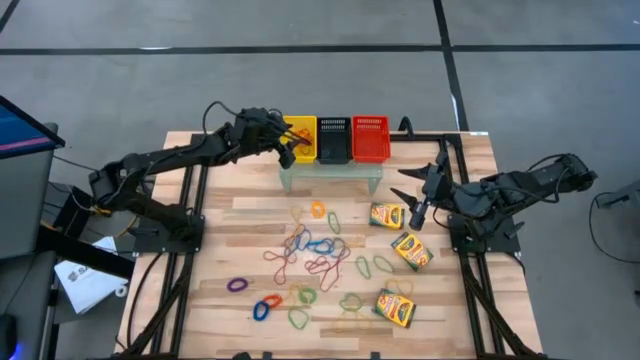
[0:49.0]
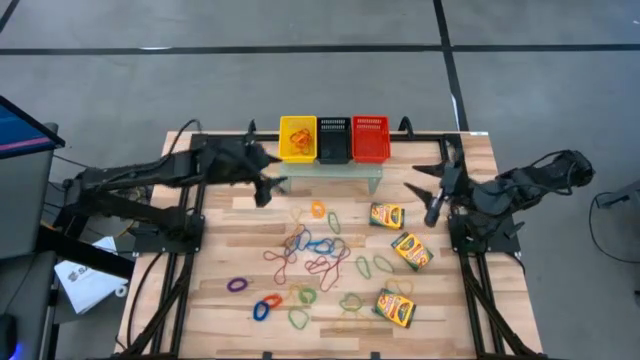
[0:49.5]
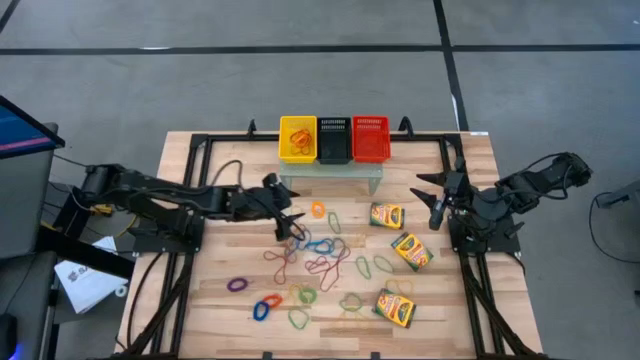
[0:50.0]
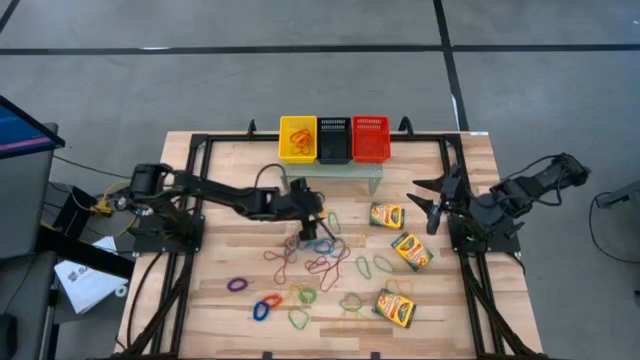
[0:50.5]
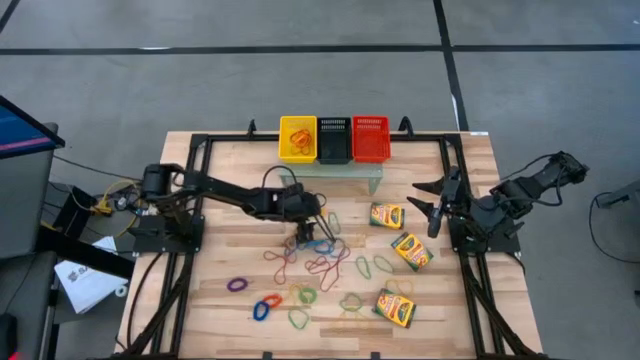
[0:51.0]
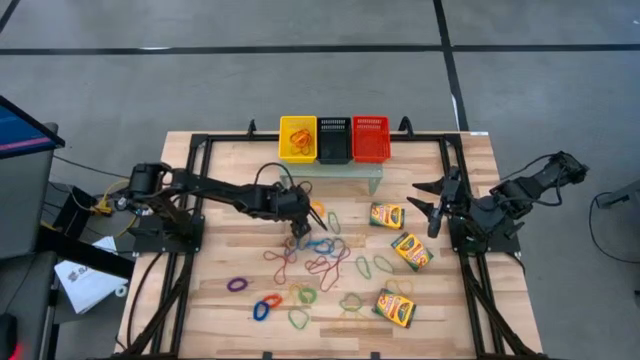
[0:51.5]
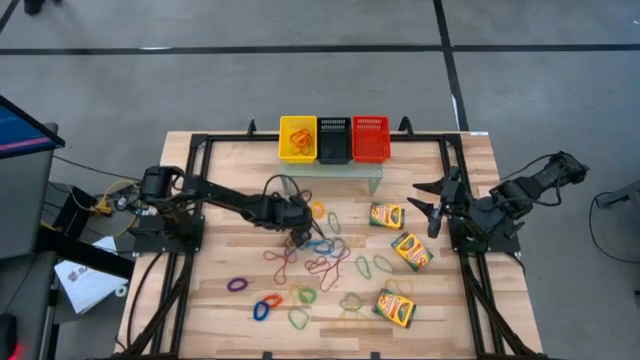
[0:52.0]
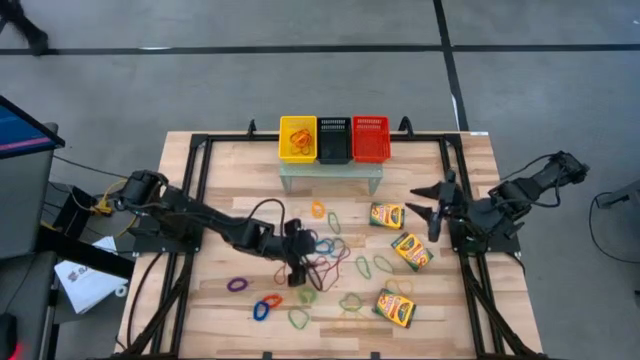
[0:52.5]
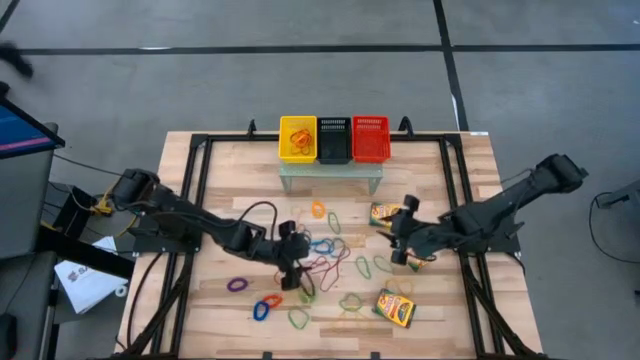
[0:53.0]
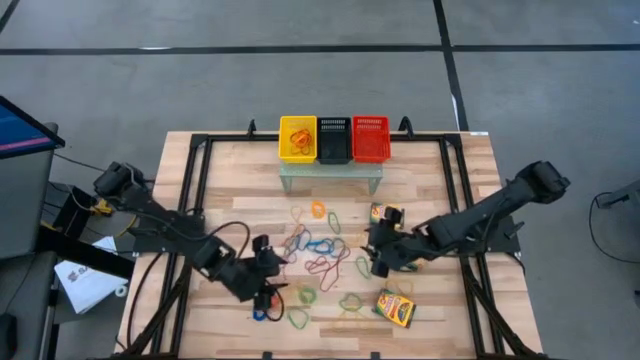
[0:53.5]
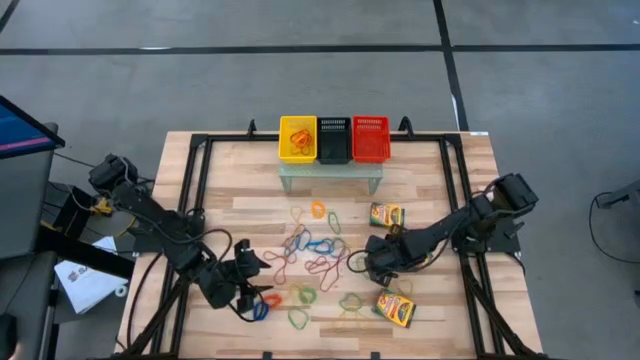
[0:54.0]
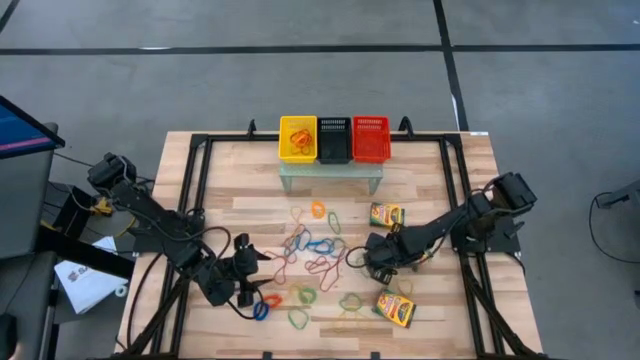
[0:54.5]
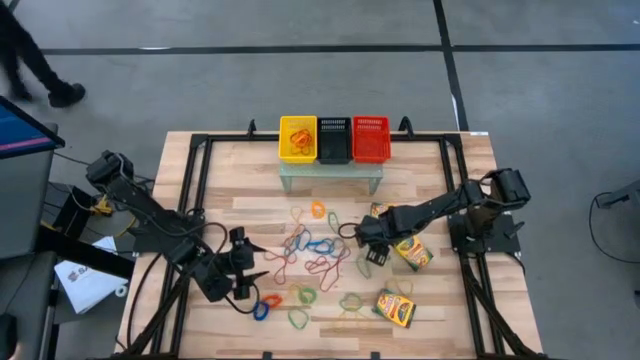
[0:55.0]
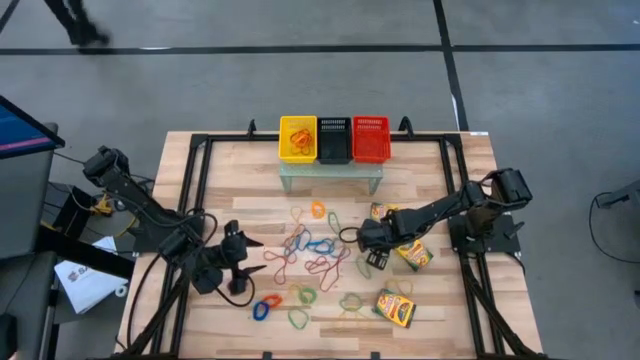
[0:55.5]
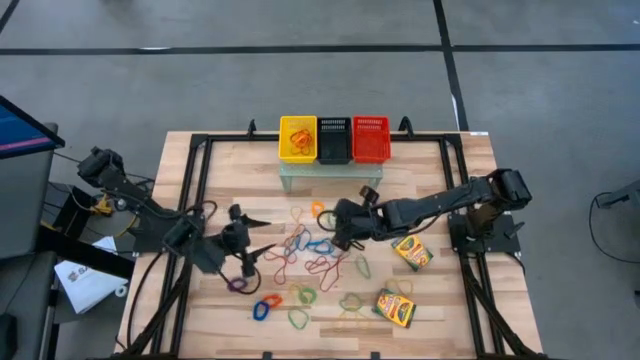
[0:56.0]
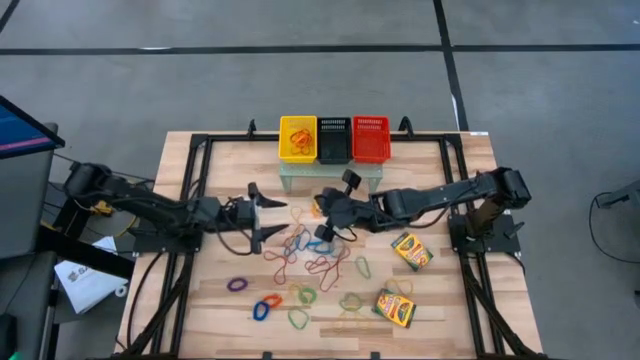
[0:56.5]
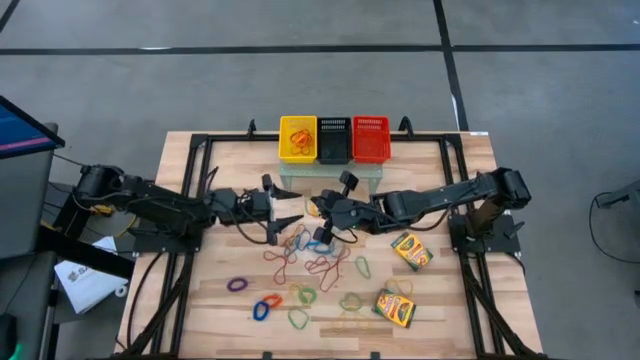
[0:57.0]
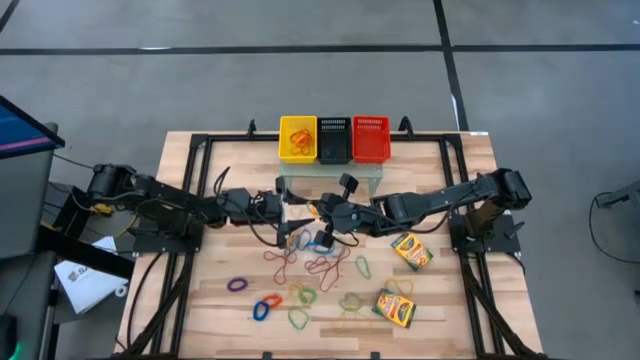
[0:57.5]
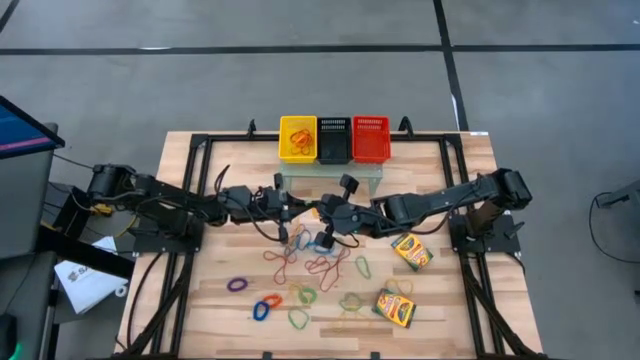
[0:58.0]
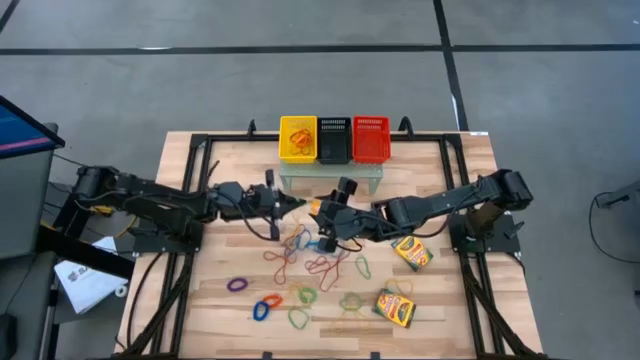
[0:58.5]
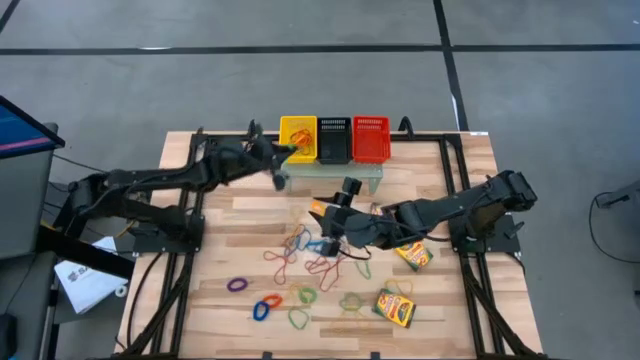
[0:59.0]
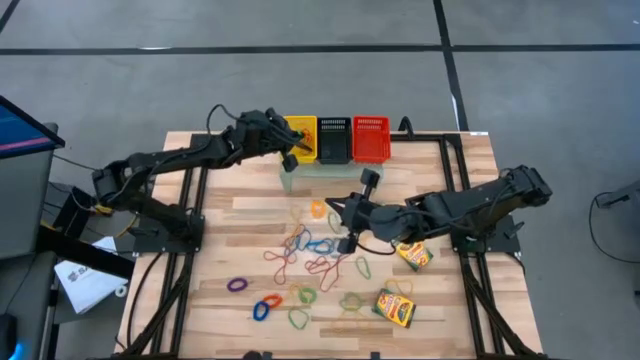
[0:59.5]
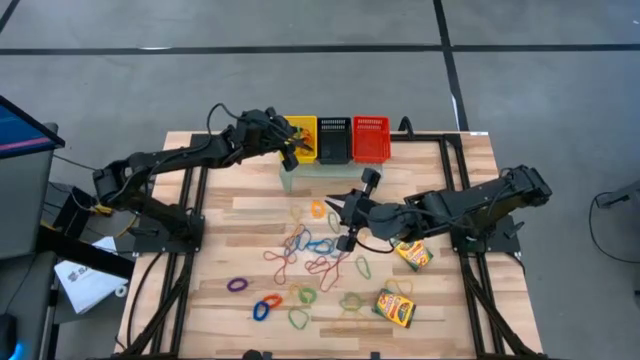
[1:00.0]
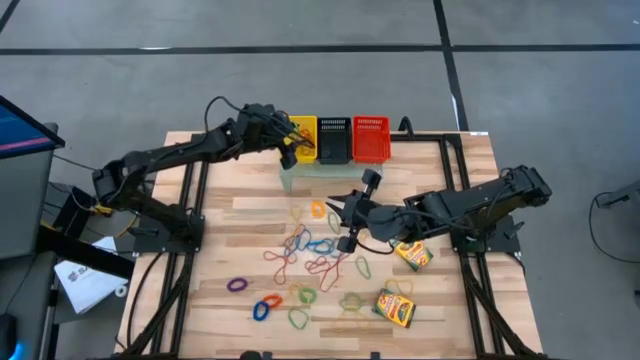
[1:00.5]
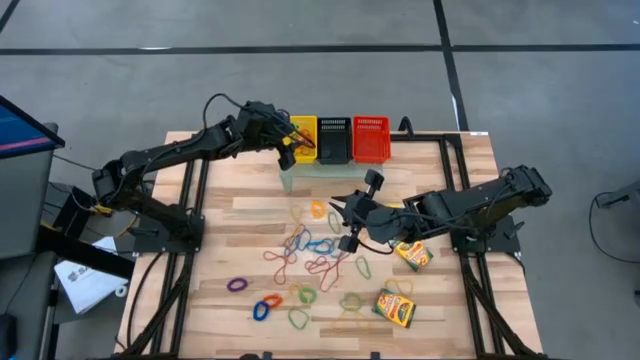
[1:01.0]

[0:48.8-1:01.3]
Task: Pick & Place Office Desk Supplies
Put the small green rubber band into the yellow bin on the shelf

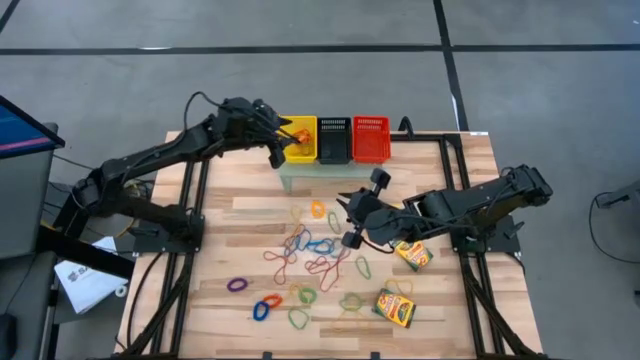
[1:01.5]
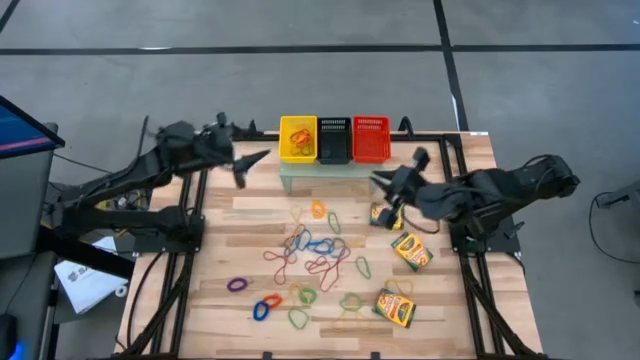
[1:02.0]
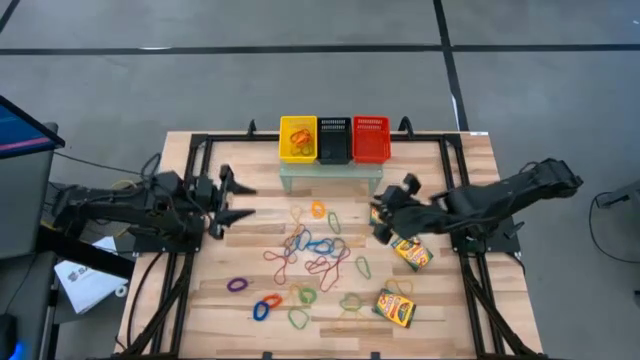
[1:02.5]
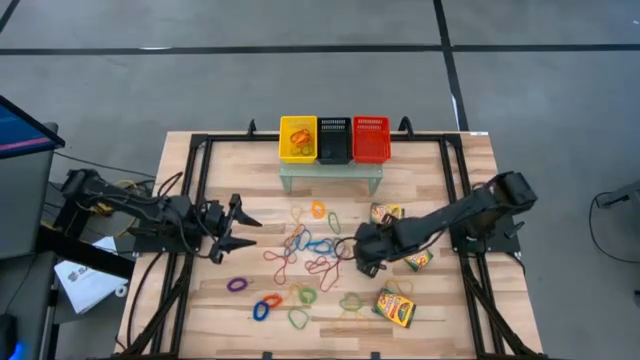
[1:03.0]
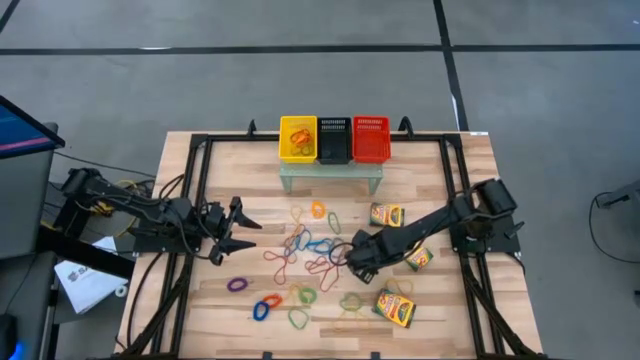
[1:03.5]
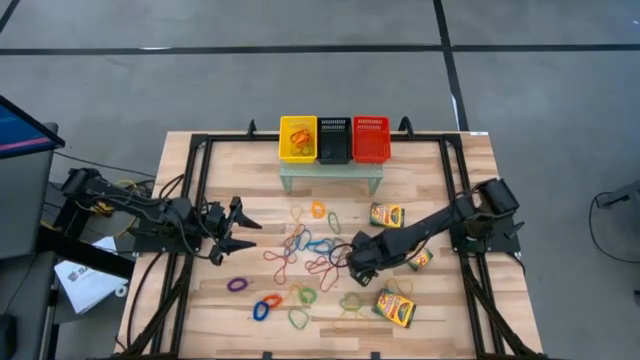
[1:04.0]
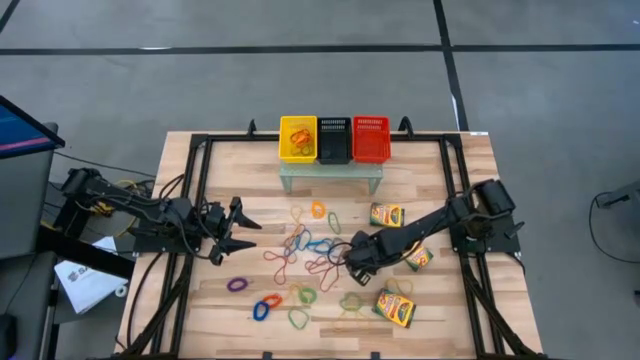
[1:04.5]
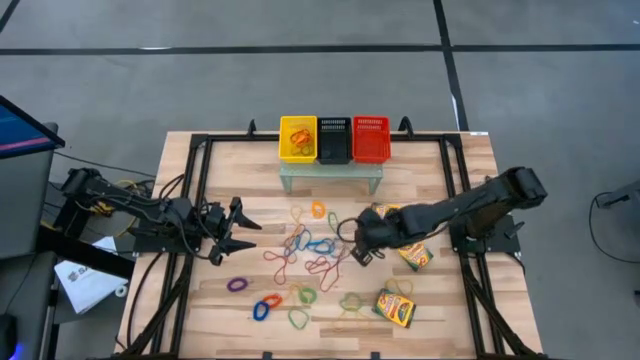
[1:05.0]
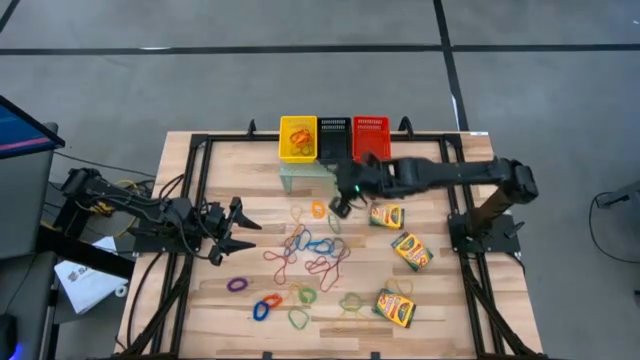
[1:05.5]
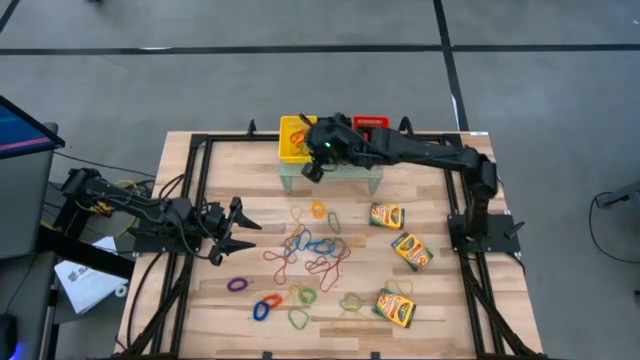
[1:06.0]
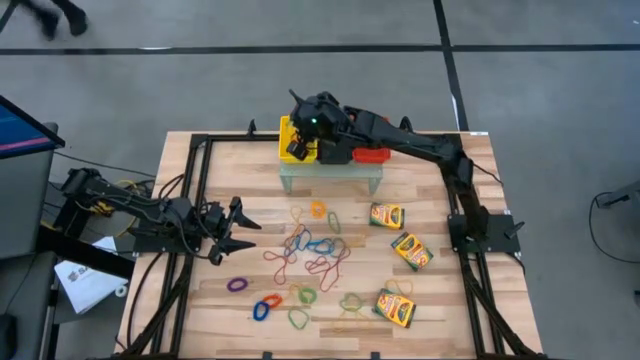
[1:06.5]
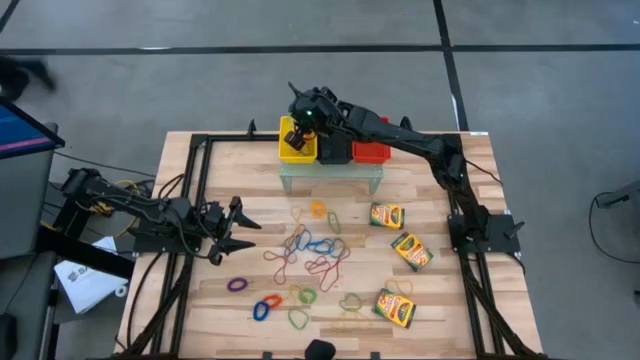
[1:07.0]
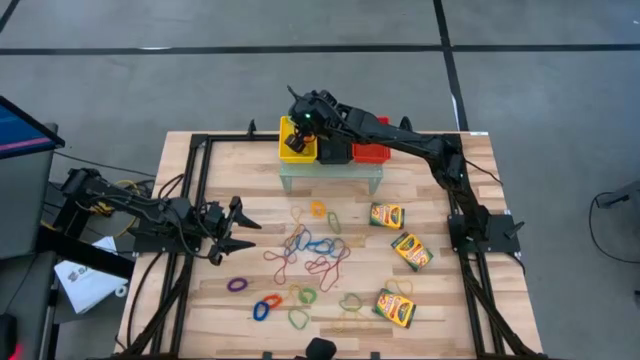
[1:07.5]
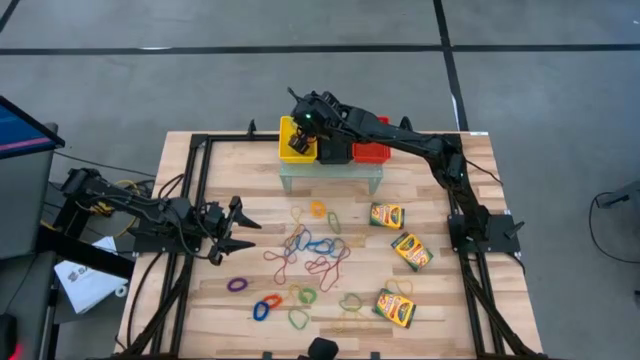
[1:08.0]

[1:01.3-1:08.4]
Put the small green rubber band into the yellow bin on the shelf

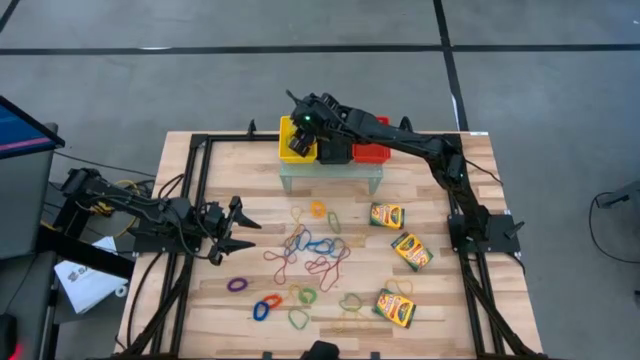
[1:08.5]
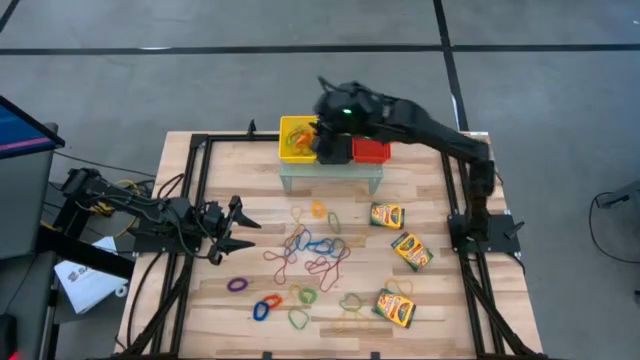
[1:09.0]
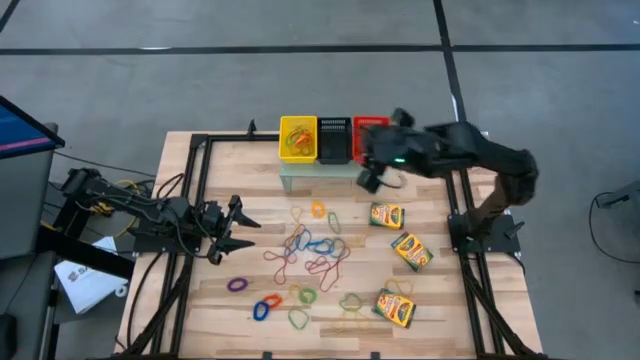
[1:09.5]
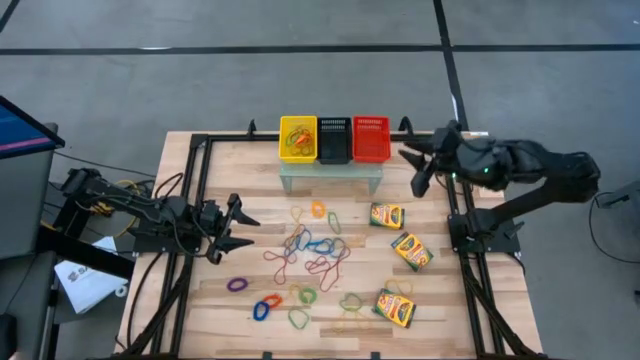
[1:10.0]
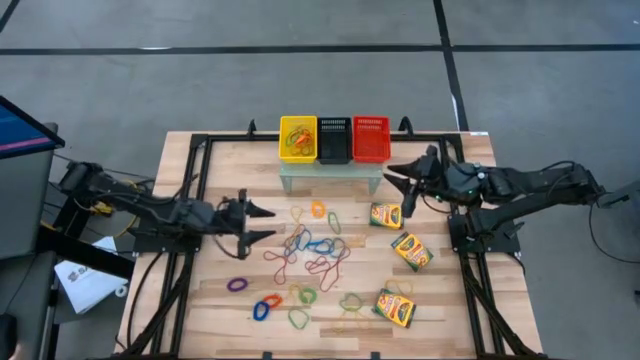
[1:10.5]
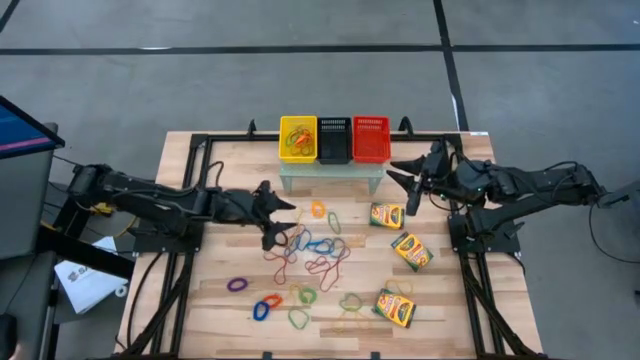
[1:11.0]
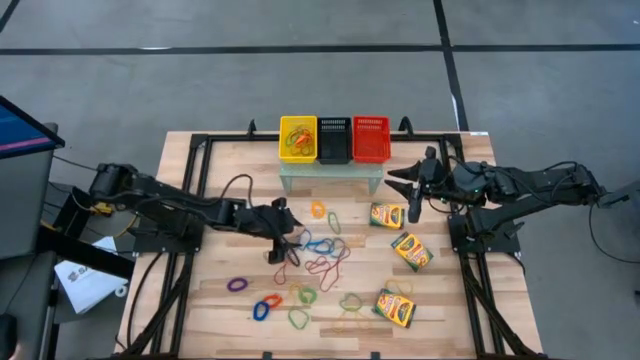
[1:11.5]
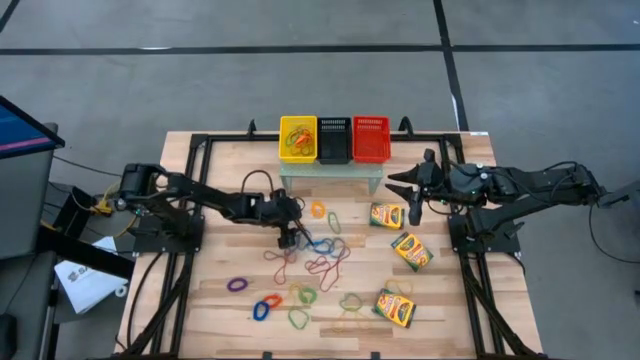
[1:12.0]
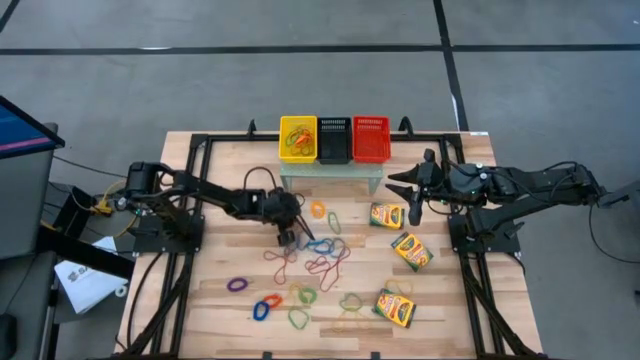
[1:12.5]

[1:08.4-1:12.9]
Put the big yellow rubber band into the yellow bin on the shelf
